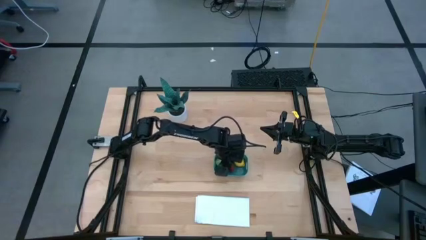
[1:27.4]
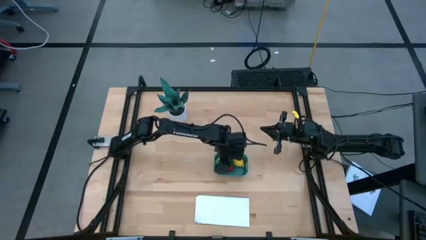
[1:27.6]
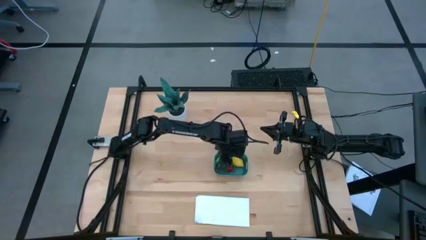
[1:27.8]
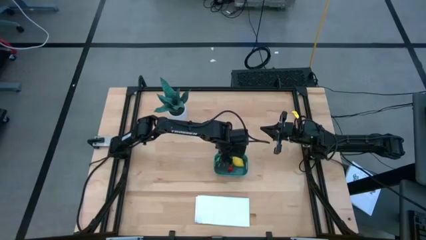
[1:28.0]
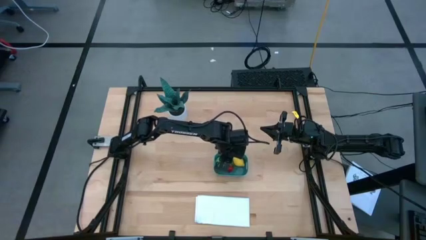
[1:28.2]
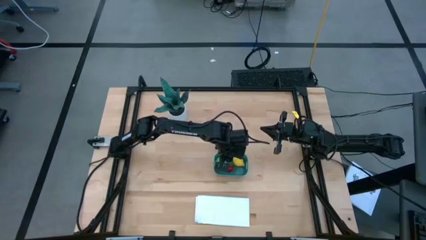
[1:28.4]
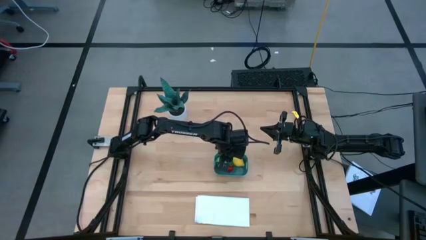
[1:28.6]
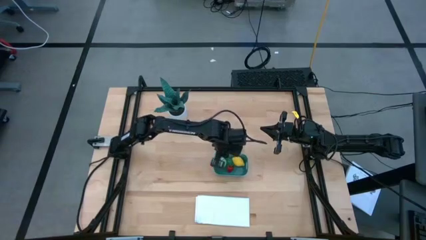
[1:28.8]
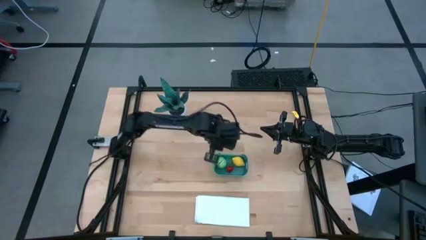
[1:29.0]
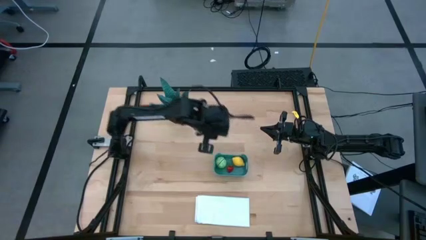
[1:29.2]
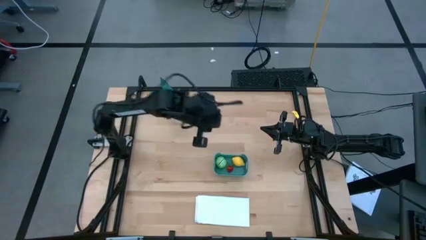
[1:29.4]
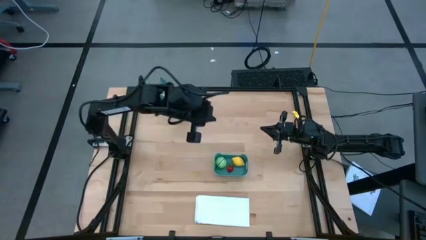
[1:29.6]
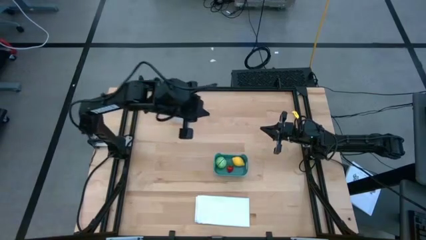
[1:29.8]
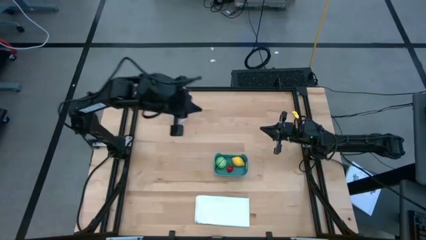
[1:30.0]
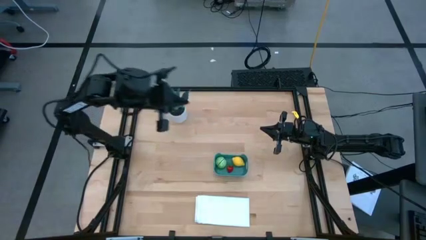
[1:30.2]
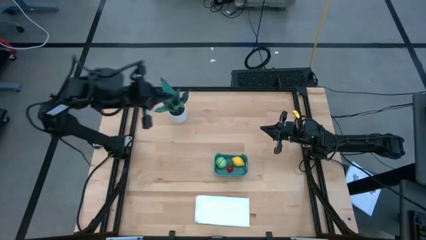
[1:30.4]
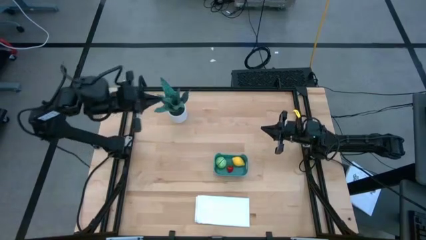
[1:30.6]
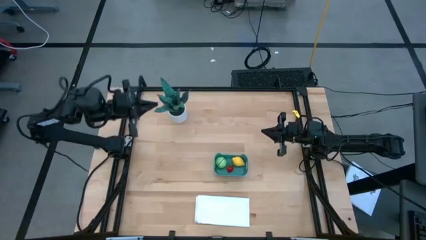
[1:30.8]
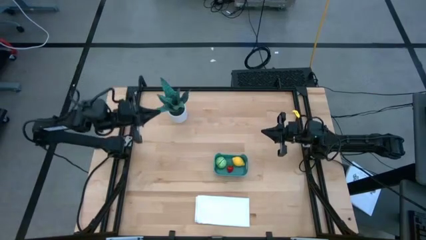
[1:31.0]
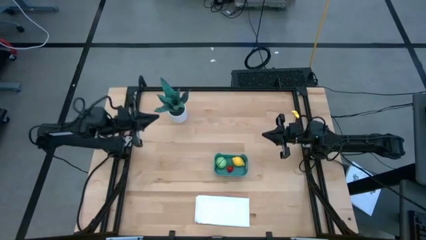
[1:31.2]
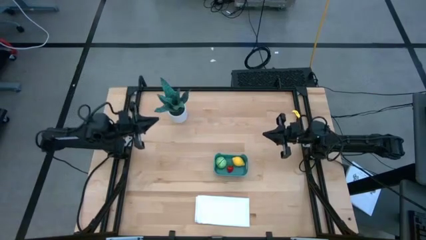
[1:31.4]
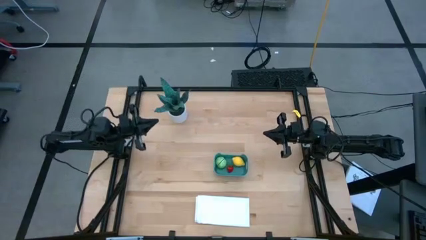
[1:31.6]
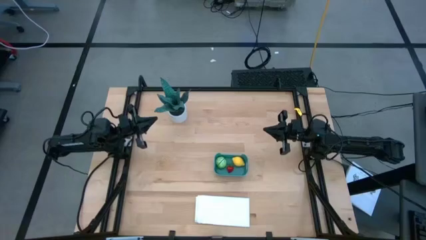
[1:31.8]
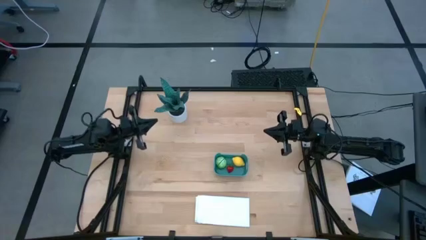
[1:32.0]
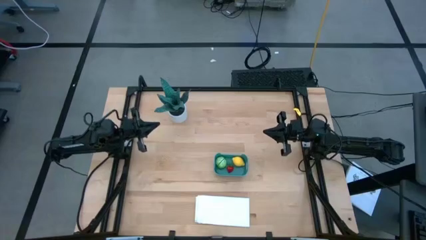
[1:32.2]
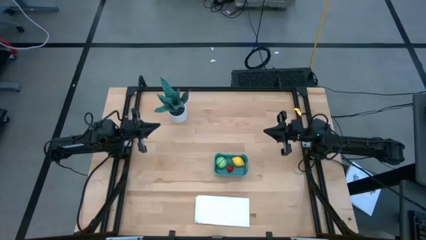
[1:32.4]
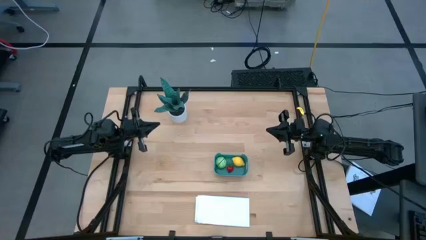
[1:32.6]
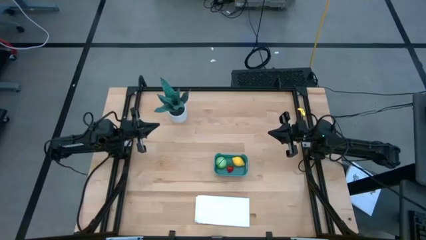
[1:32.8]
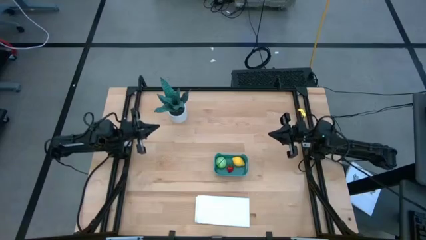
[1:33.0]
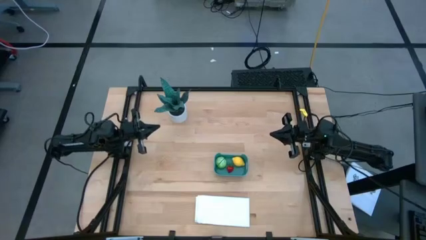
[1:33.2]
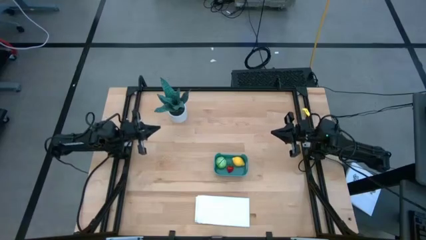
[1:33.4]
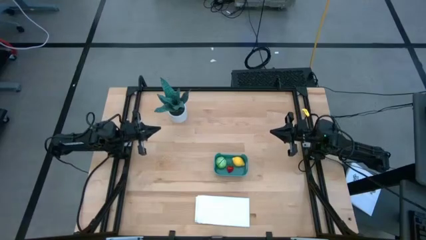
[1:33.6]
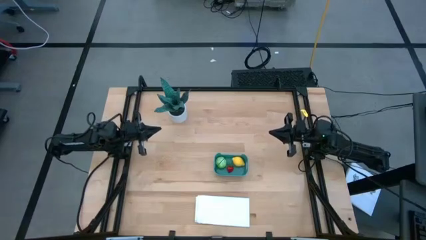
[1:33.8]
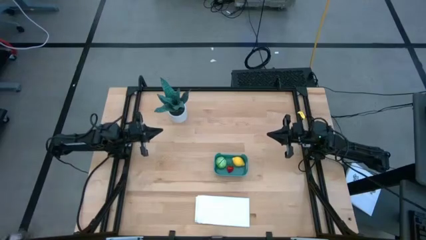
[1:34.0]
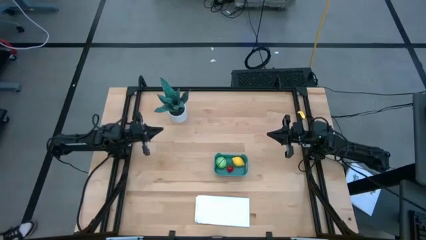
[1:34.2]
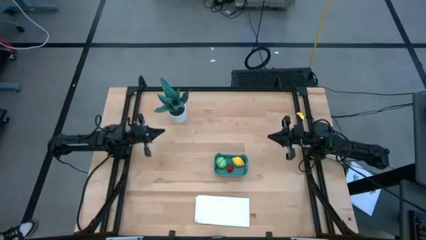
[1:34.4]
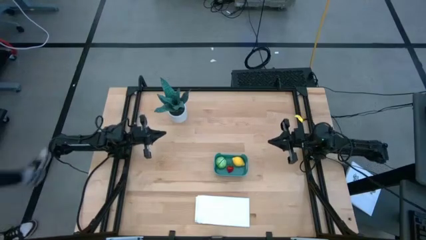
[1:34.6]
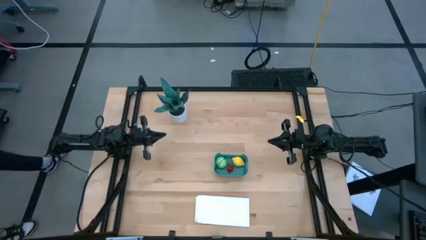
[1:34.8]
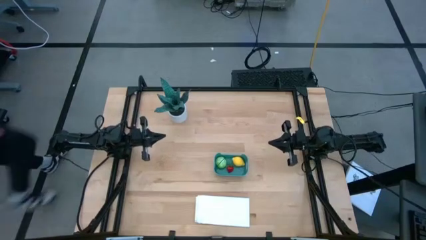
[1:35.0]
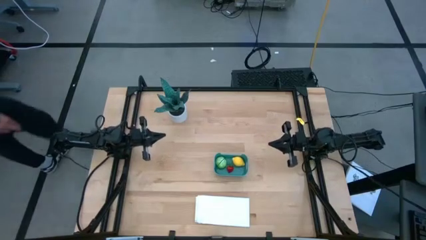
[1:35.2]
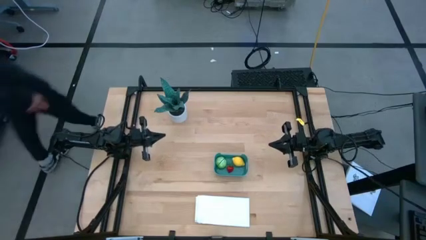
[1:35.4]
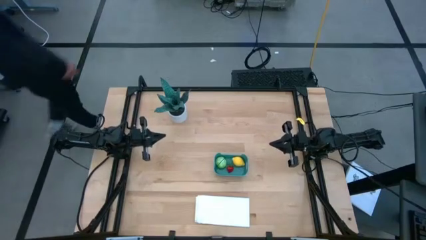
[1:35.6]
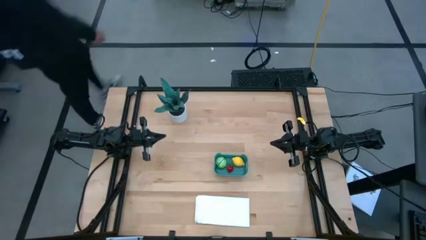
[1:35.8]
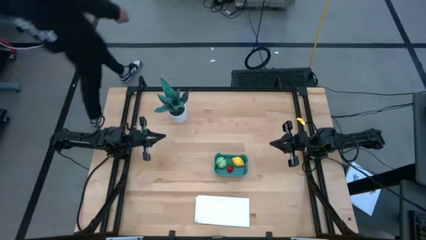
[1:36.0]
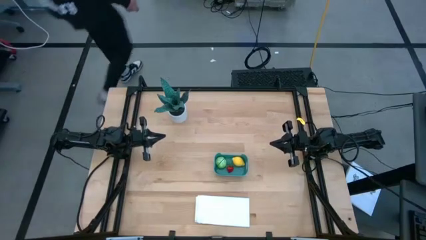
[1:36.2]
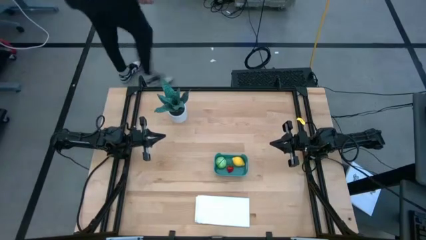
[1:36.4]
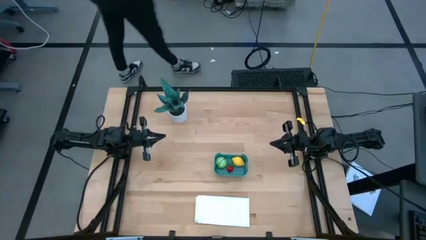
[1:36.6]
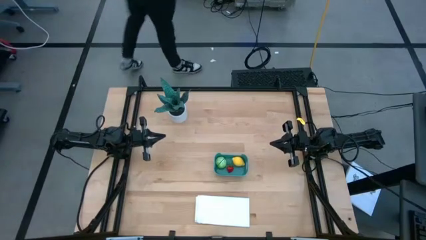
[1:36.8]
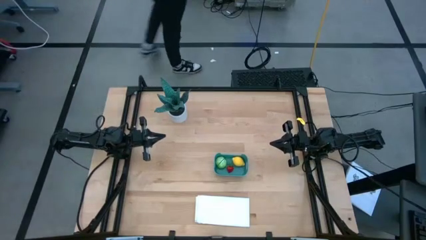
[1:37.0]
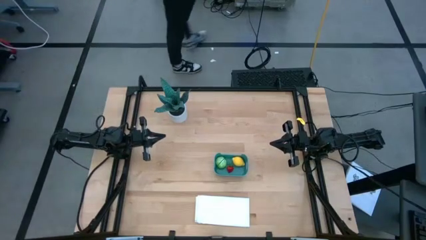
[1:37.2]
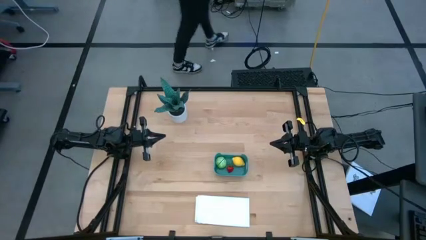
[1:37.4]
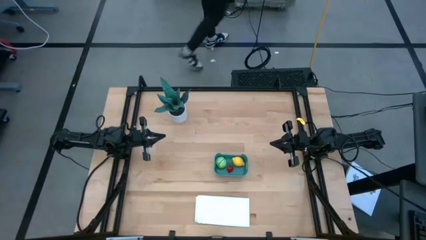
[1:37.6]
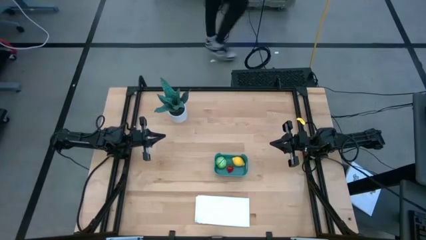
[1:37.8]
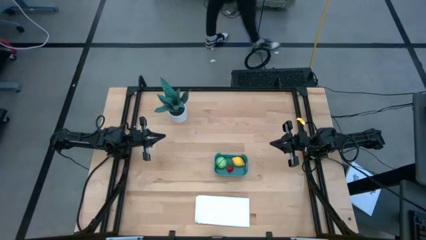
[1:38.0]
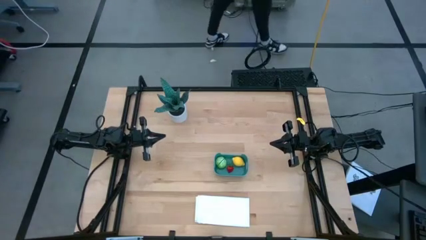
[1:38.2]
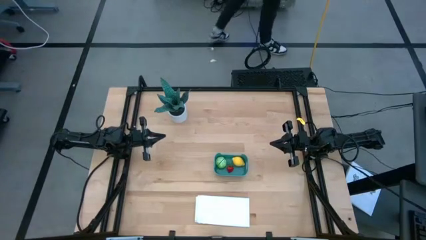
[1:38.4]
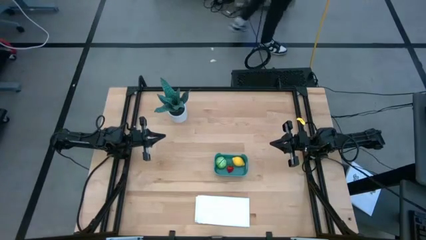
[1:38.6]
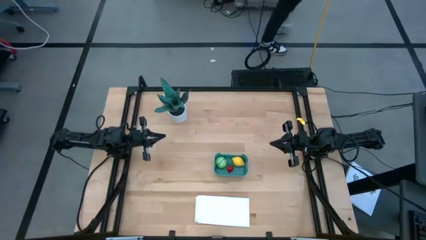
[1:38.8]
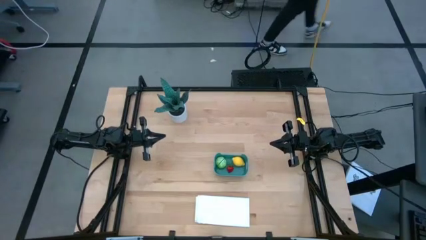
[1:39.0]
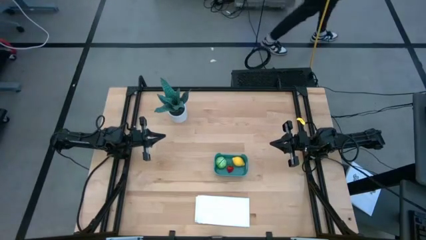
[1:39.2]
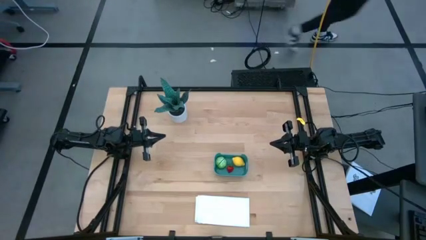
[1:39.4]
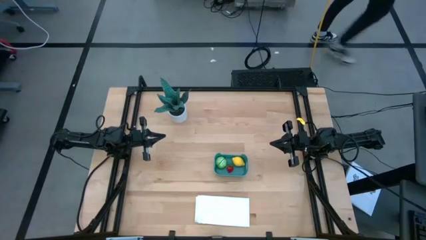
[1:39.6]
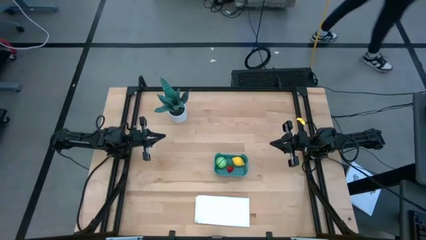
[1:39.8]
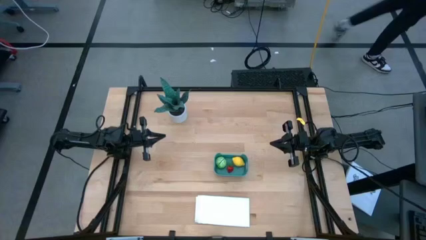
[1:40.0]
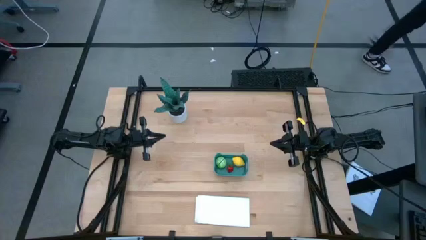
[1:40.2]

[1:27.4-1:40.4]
Task: Pick and placing Produce into tupperware
Return to Home Position
